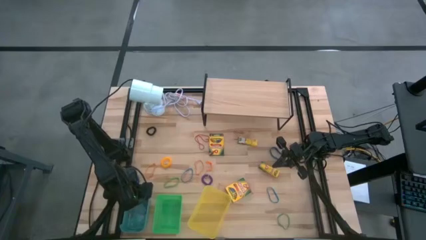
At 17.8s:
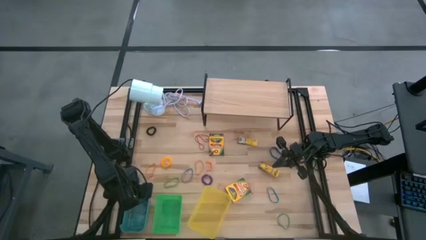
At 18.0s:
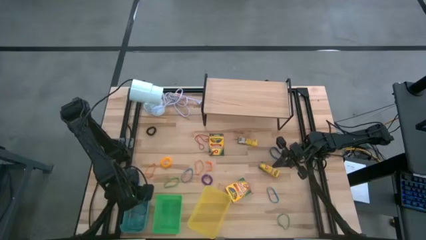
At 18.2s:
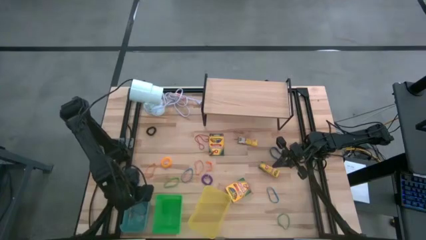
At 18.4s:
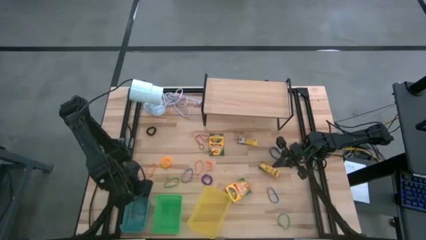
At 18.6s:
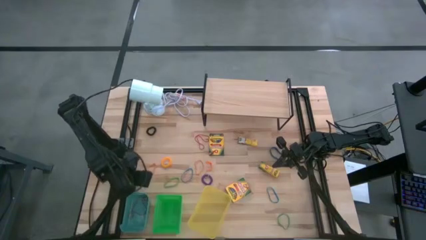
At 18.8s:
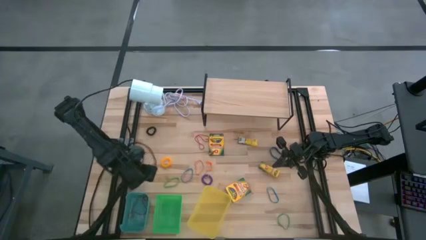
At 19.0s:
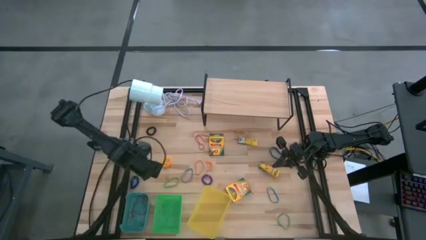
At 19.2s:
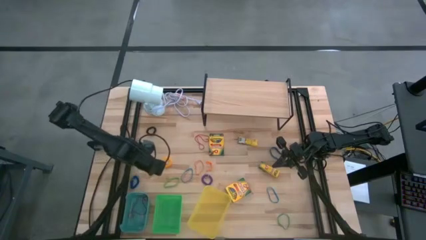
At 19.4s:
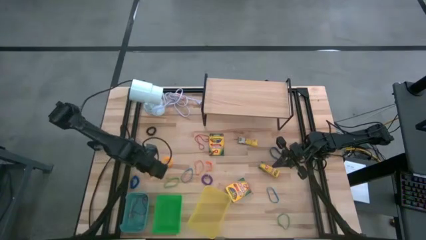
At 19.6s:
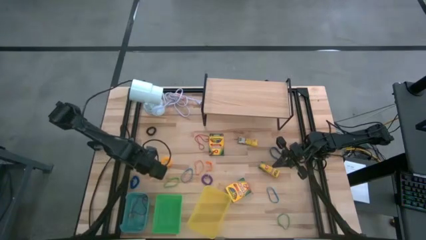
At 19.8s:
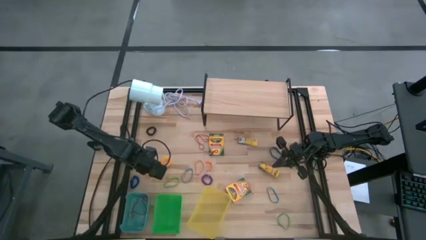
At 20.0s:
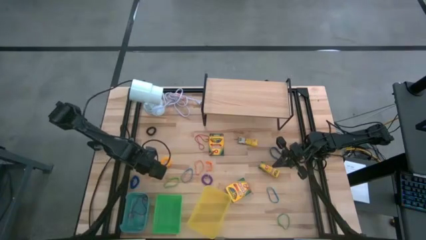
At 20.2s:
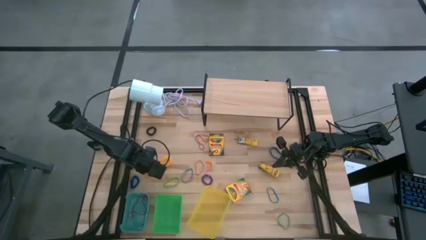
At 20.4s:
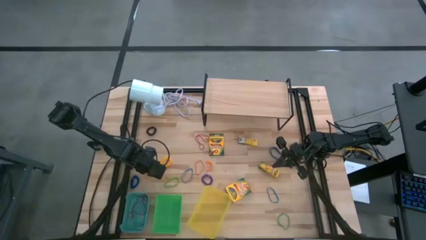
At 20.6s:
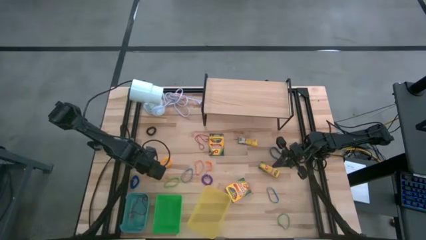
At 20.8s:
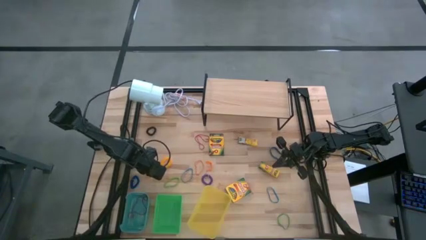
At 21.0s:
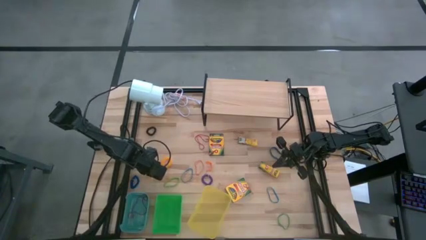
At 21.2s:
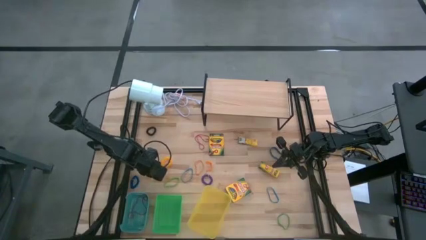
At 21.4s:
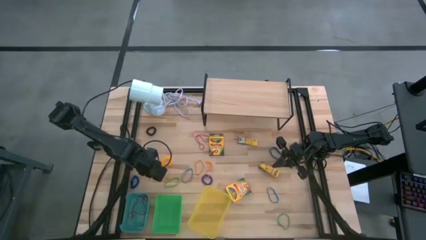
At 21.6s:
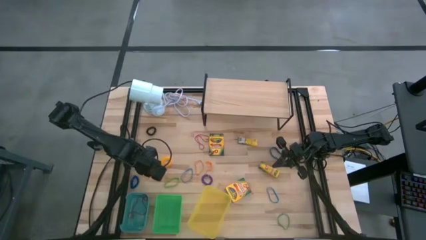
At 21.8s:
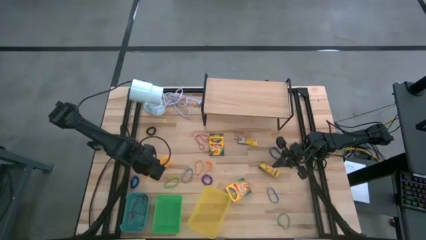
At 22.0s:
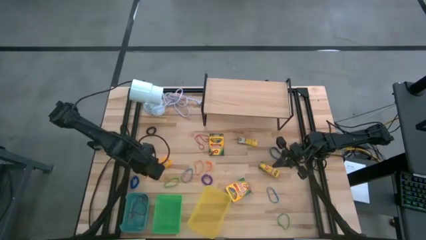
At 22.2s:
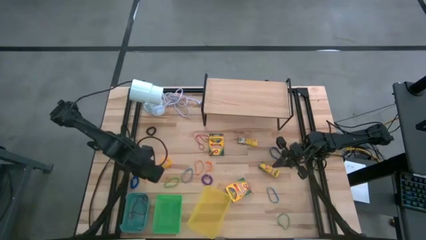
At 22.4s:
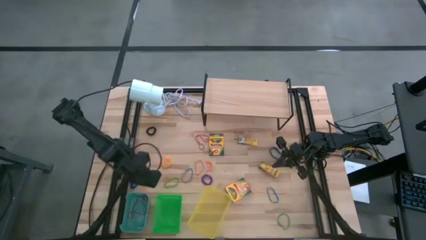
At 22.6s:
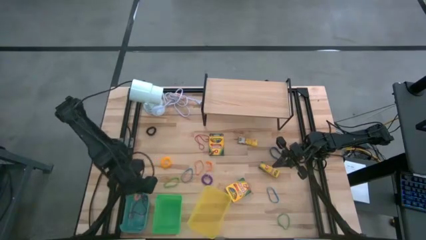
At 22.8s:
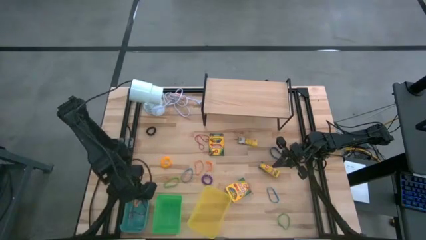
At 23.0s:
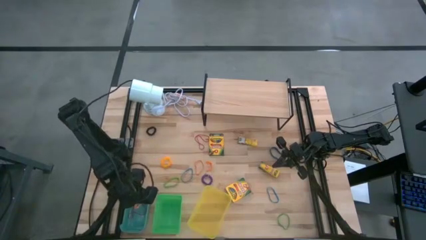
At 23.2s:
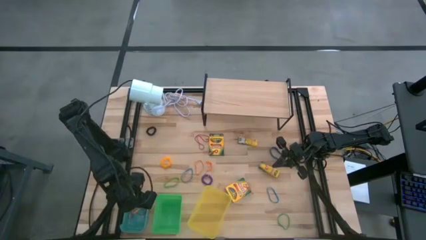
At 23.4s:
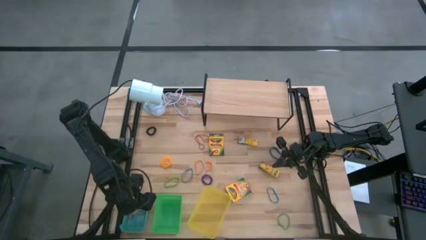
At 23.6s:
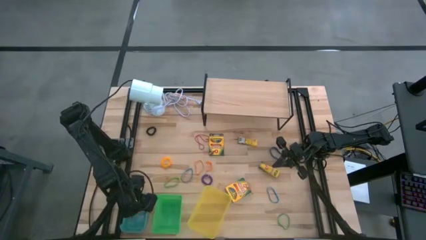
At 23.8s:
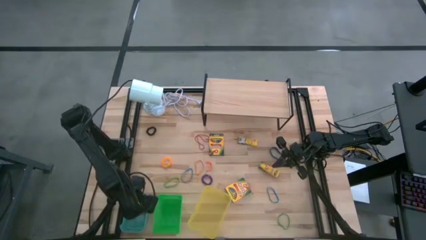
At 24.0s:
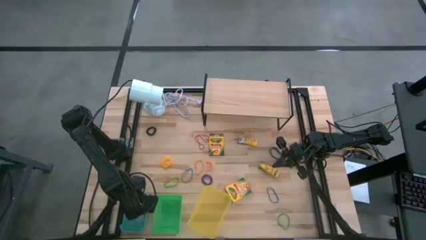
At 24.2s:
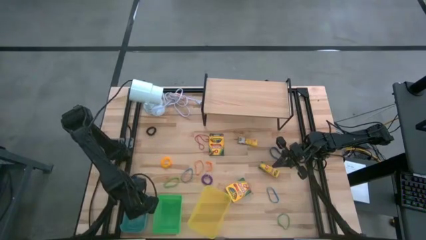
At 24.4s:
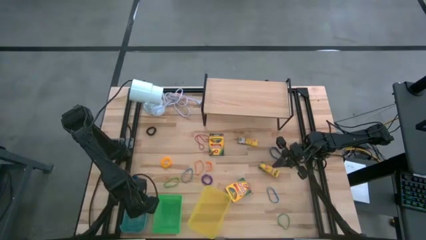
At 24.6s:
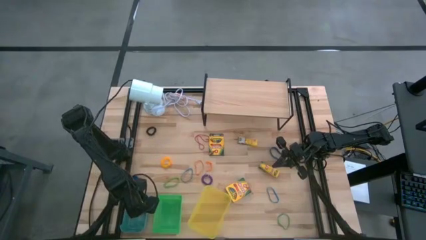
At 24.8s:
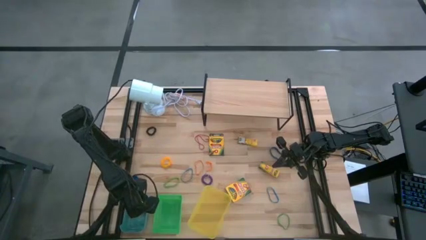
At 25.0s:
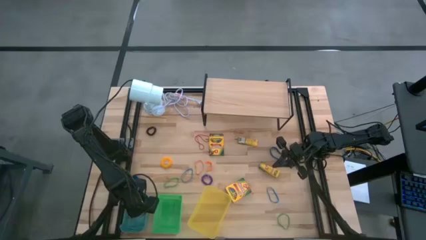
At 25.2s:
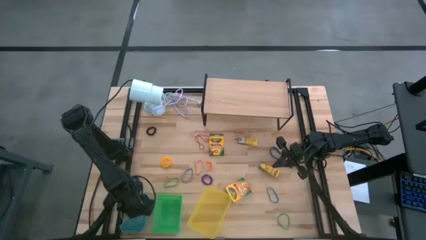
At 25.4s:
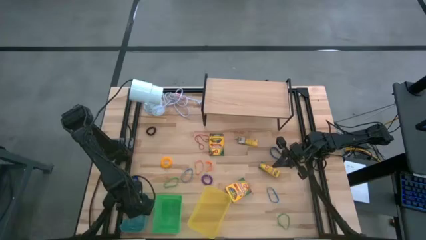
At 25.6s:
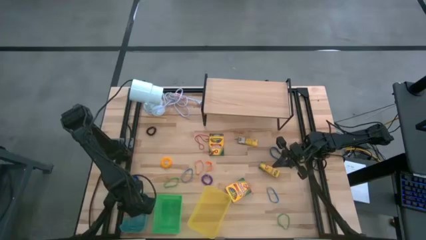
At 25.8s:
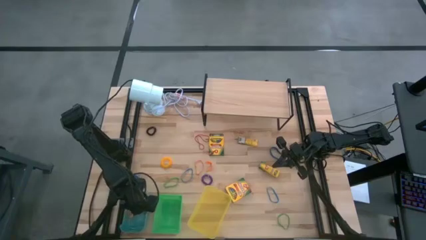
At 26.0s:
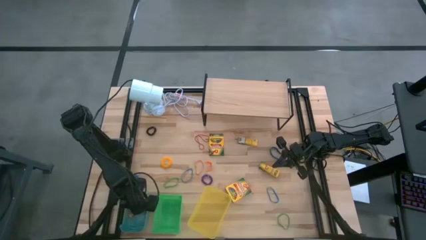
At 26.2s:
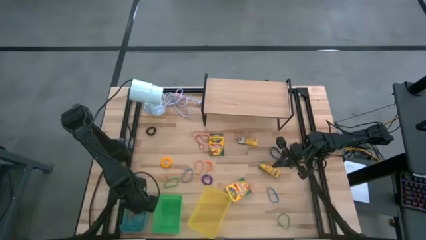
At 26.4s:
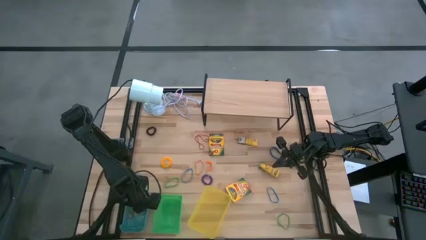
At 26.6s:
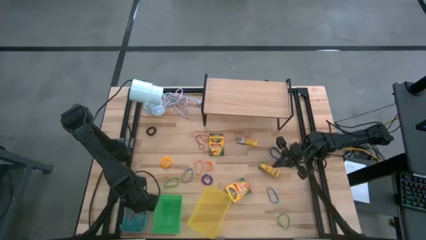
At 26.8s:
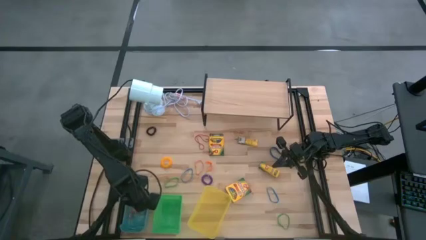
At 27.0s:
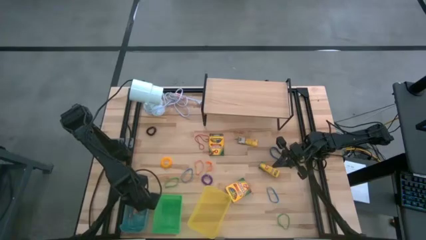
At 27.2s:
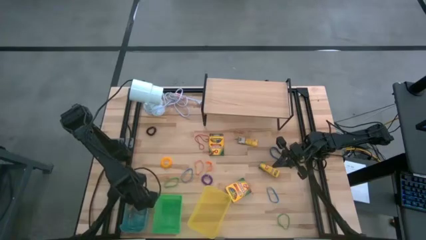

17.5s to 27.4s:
Task: Pick & Place Office Desk Supplies
Put the orange rubberband into the blue bin
